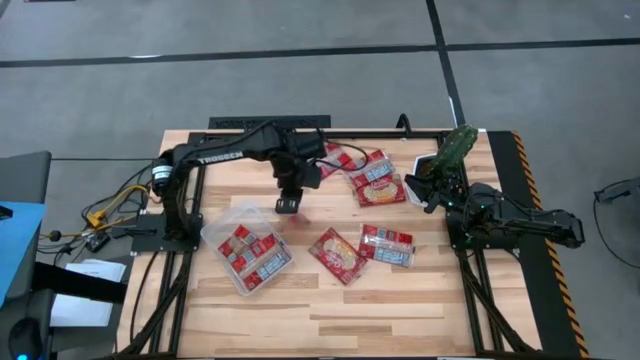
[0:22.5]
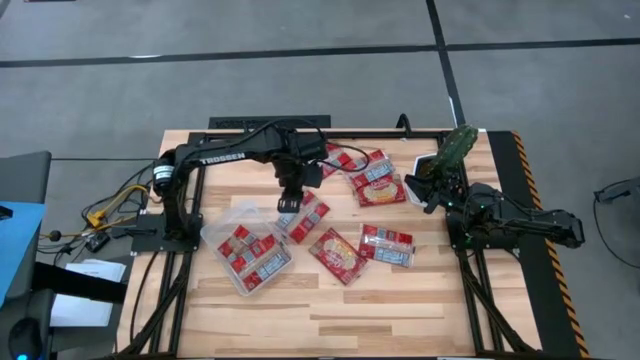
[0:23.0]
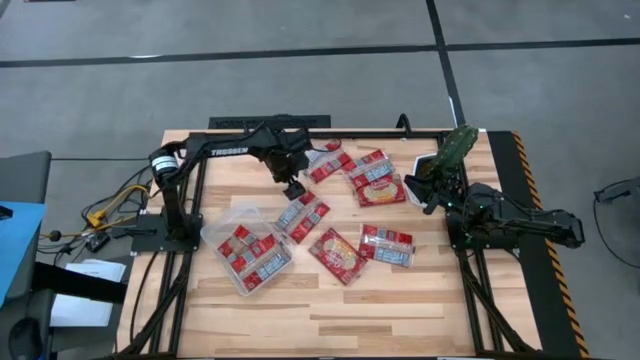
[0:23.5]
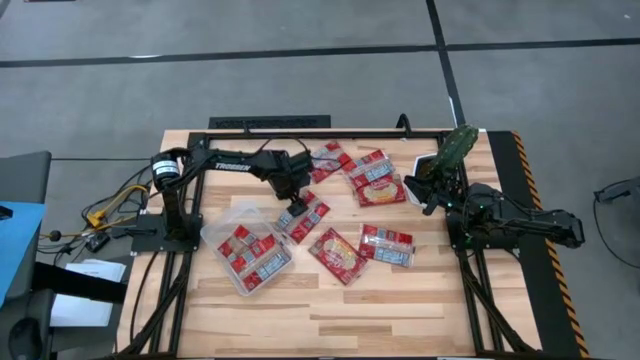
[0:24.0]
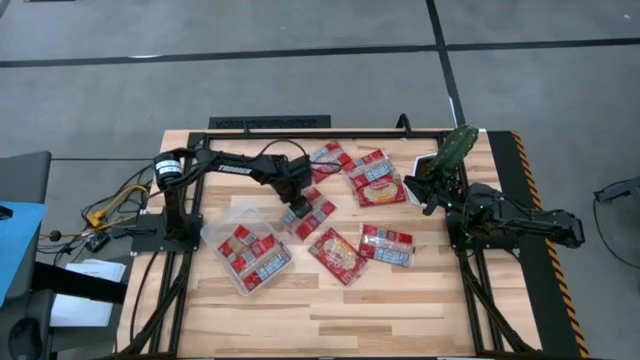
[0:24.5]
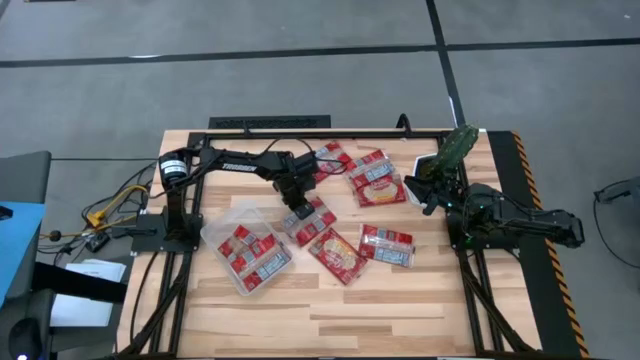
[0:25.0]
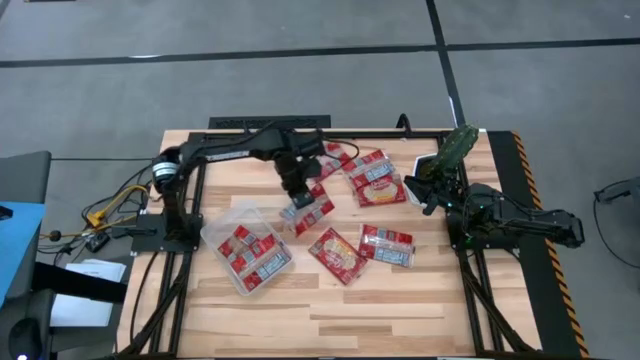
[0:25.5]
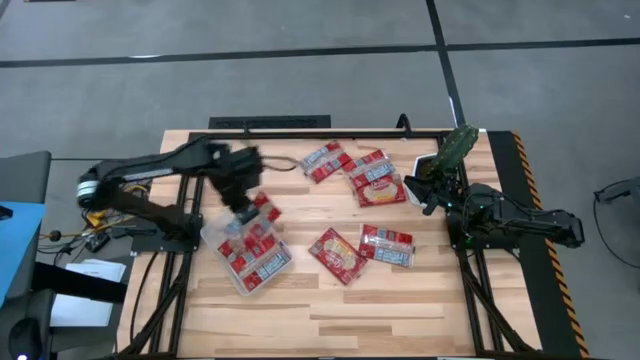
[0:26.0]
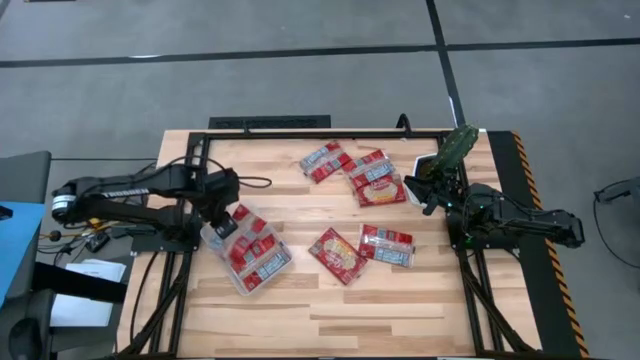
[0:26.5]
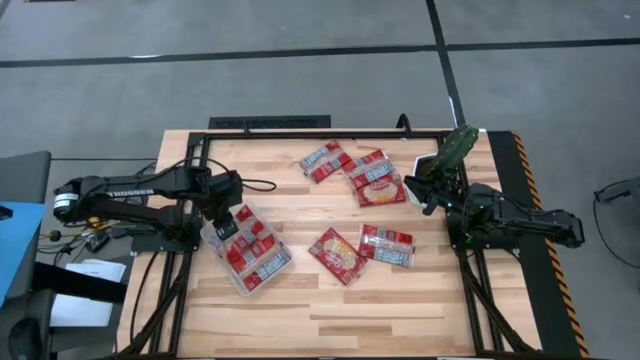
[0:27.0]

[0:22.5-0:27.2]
Task: Sort popcorn bags into baskets
Put the red popcorn bag into the transparent bin

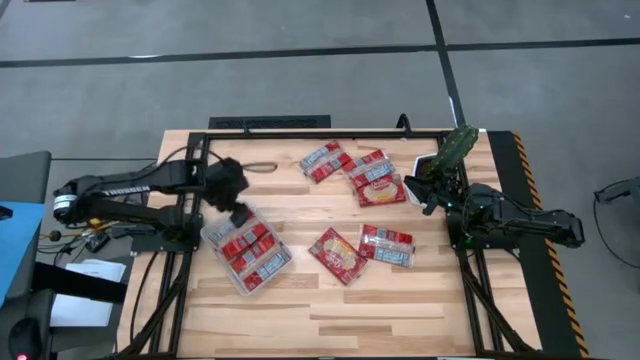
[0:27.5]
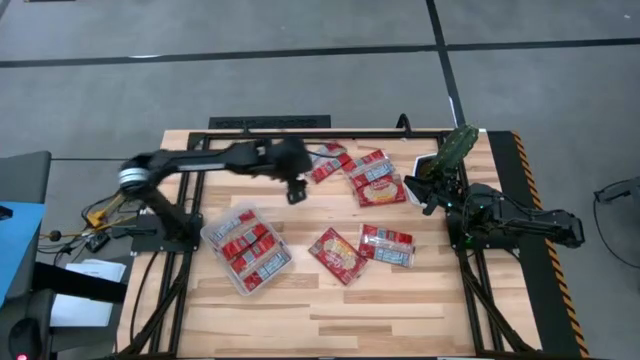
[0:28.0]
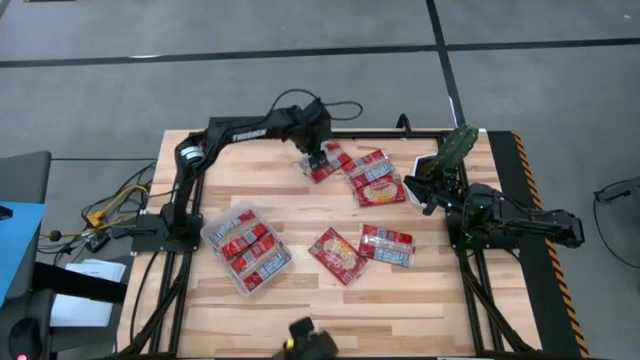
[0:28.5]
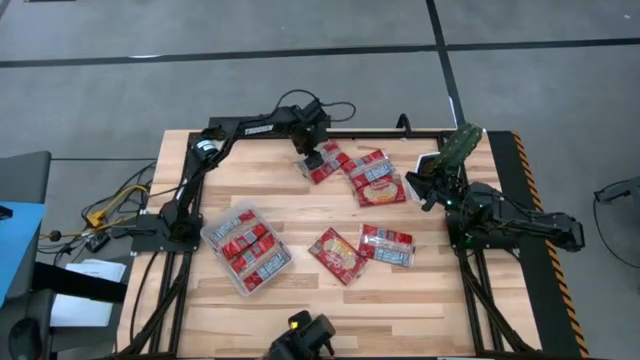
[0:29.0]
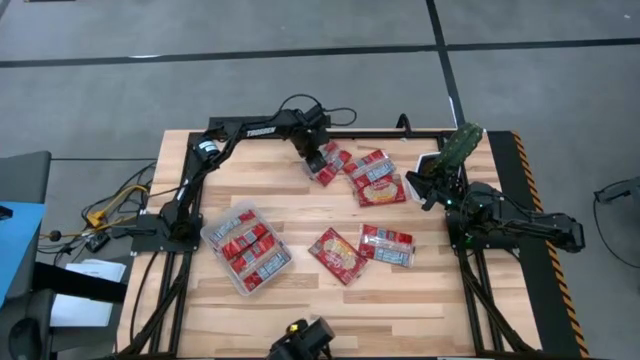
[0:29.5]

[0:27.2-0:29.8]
Put the red popcorn bag into the transparent bin

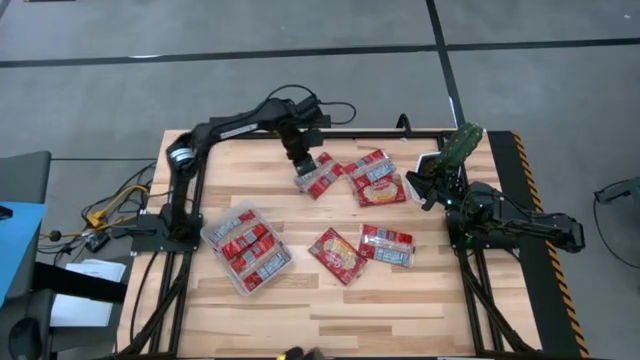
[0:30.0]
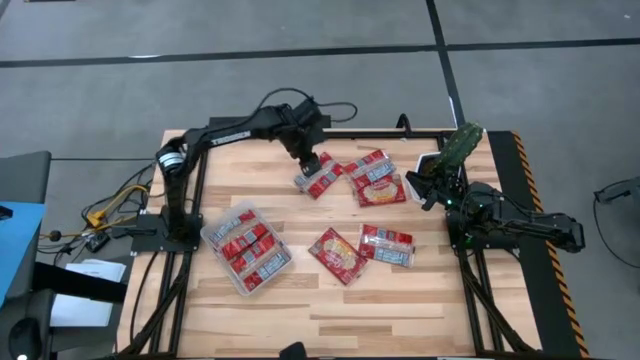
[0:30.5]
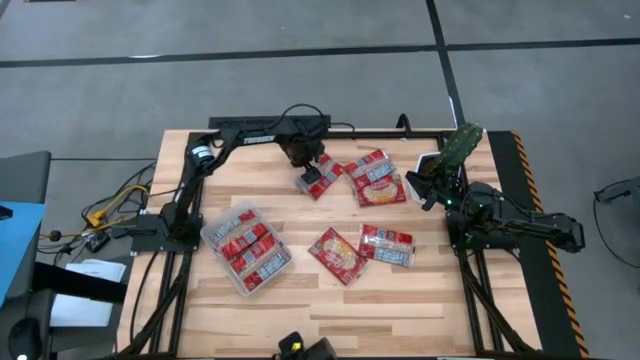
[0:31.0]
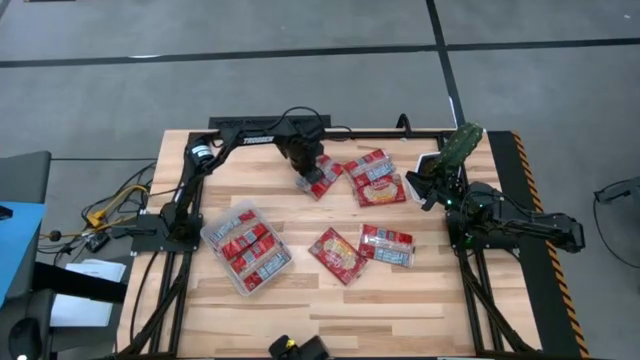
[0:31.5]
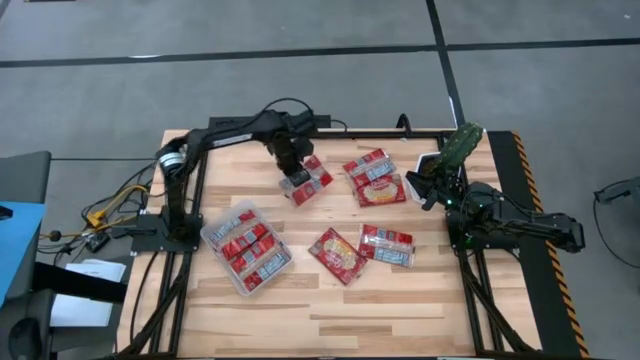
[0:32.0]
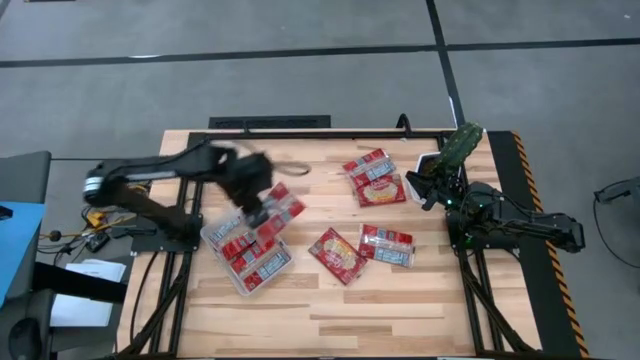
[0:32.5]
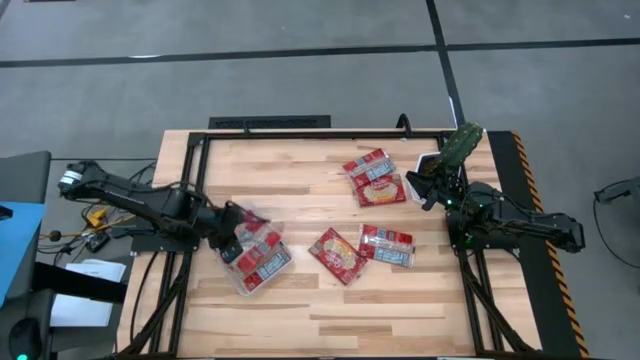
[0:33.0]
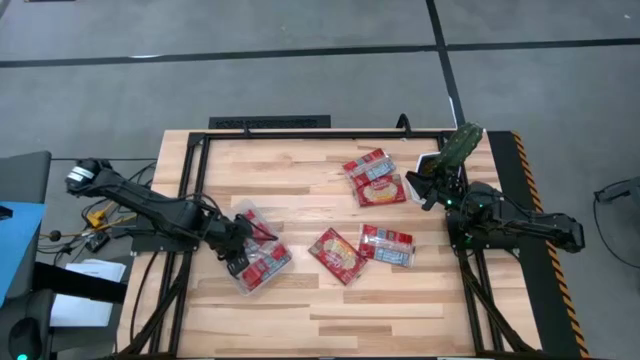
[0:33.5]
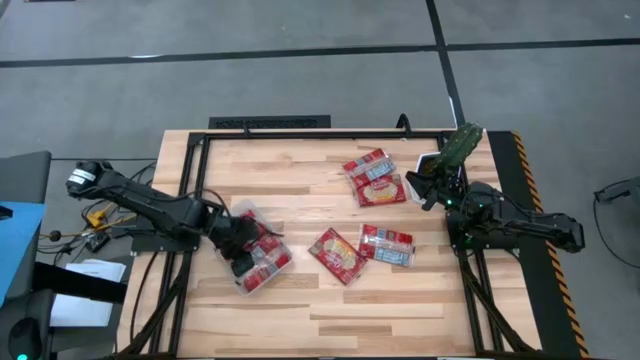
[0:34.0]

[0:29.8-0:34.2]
Put the red popcorn bag into the transparent bin

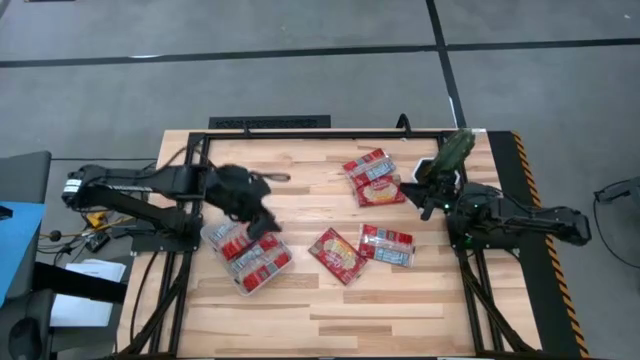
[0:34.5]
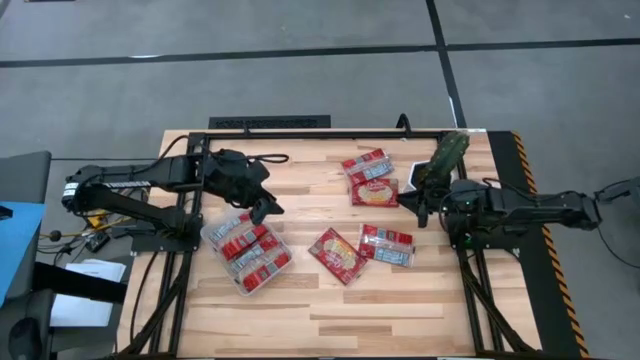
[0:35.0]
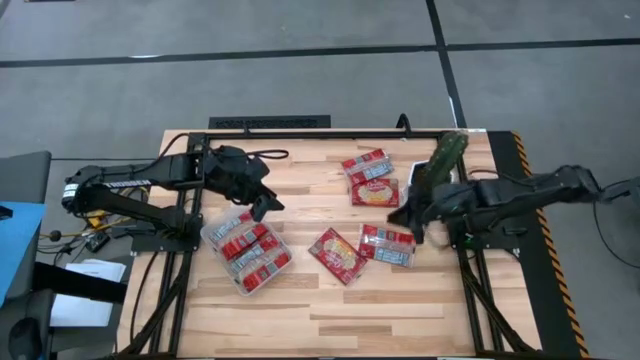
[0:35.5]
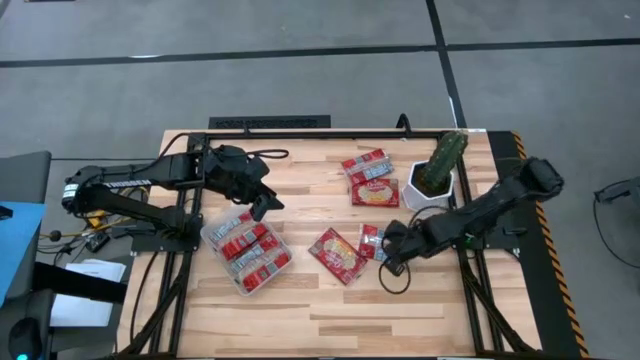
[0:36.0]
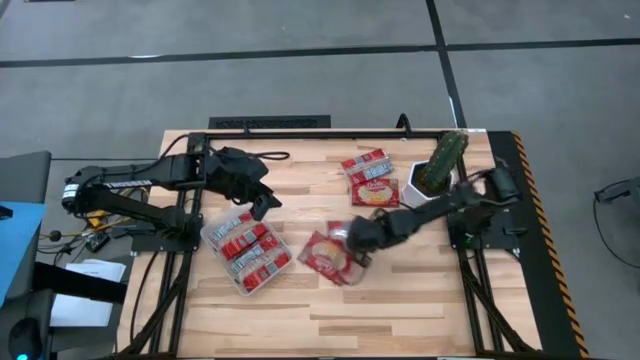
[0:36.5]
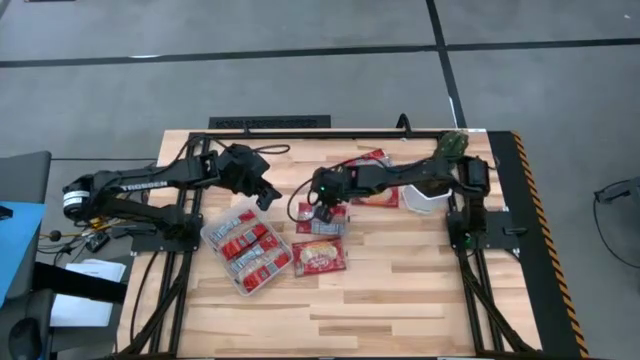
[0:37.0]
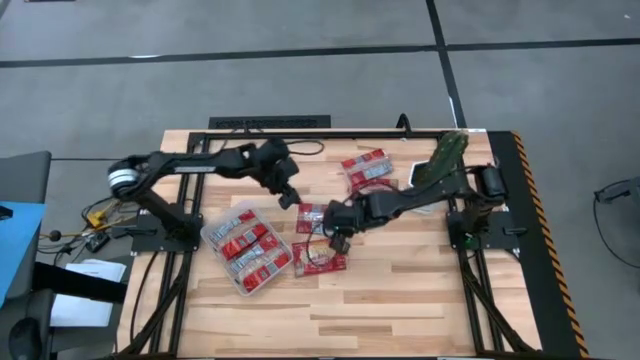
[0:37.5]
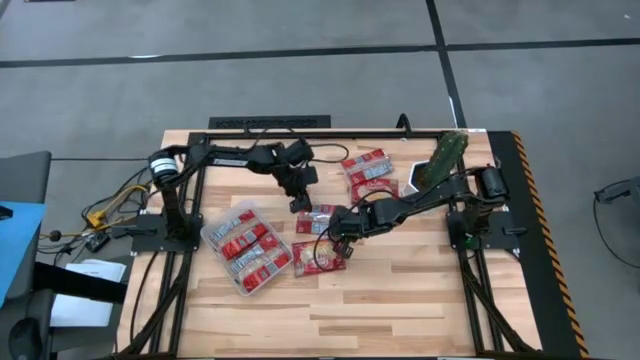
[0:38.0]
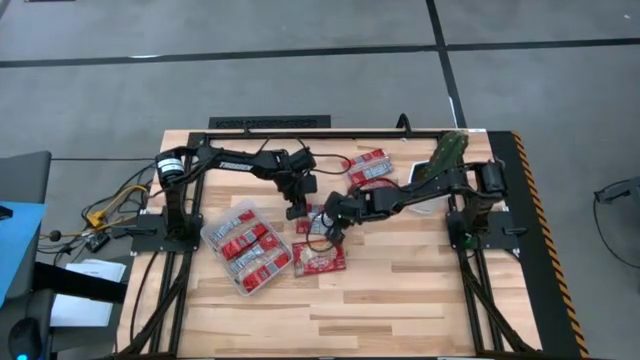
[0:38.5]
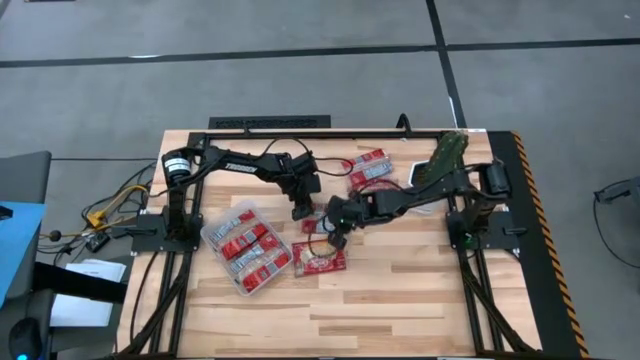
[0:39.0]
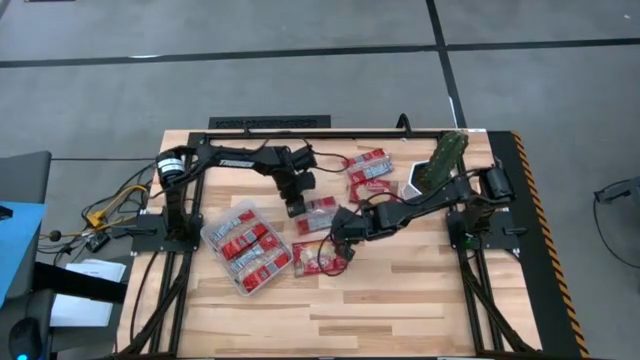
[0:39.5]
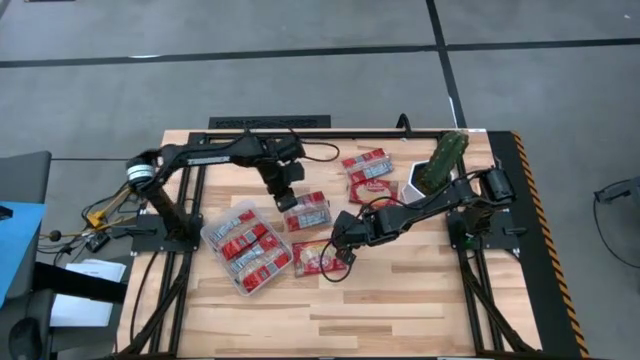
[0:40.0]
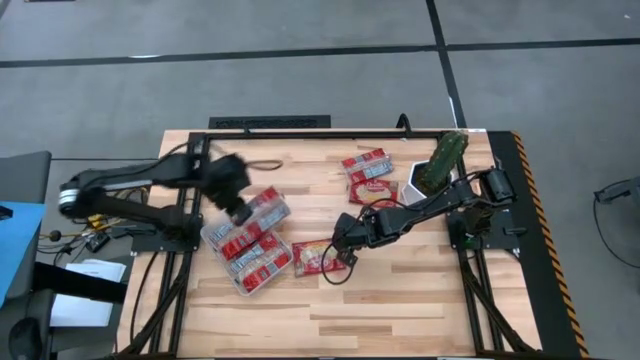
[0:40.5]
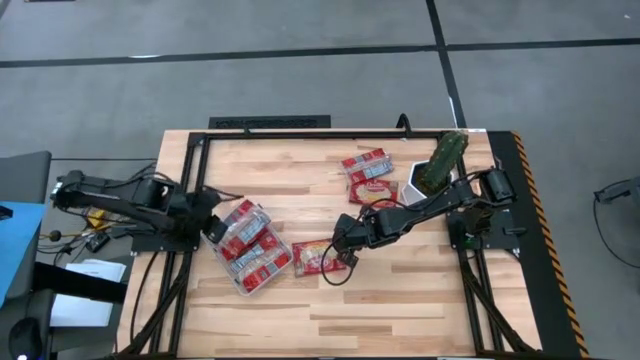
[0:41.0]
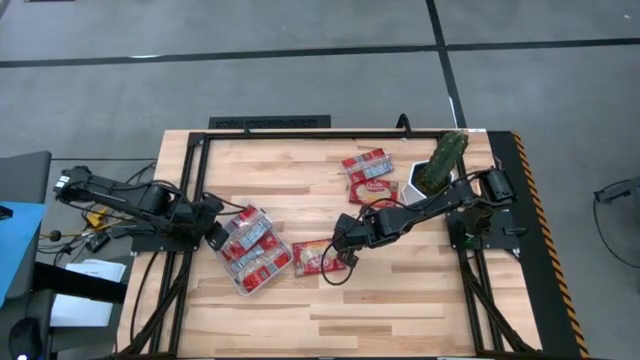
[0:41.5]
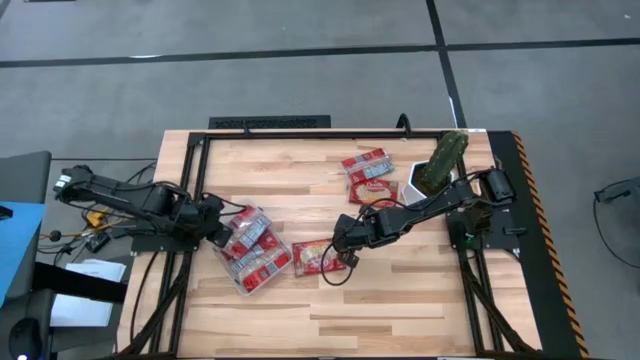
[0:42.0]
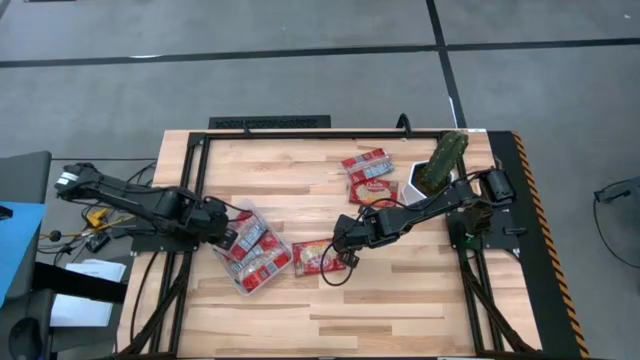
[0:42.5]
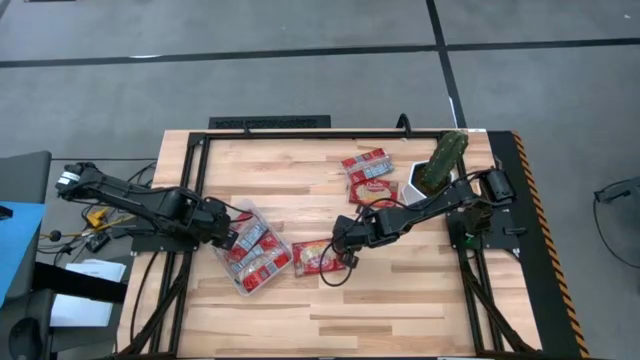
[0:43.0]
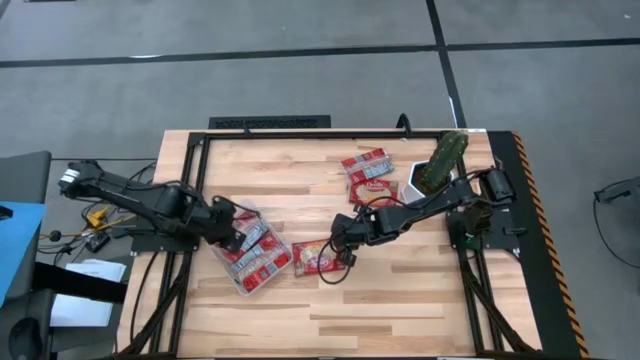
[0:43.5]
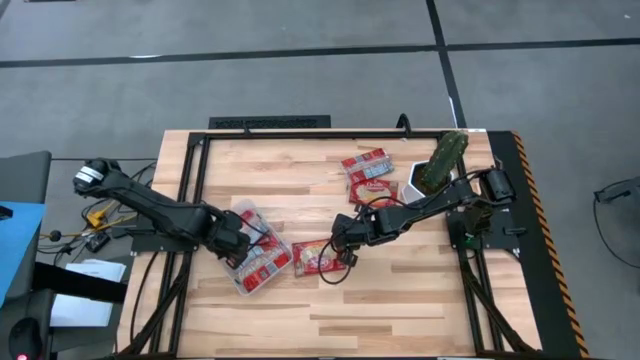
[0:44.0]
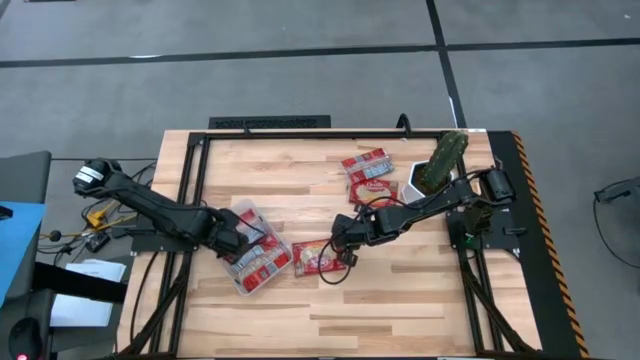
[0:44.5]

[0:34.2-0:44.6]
Put the red popcorn bag into the transparent bin
